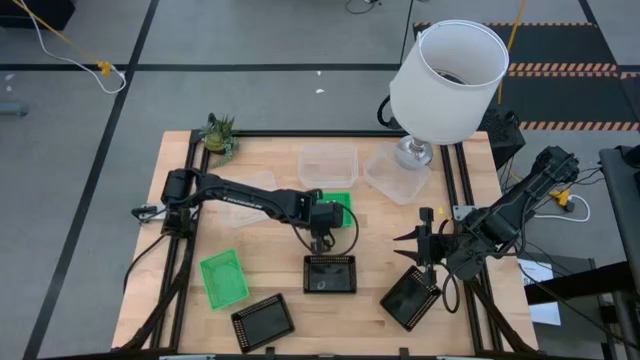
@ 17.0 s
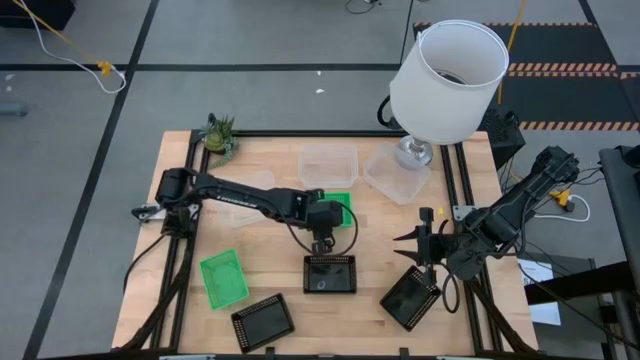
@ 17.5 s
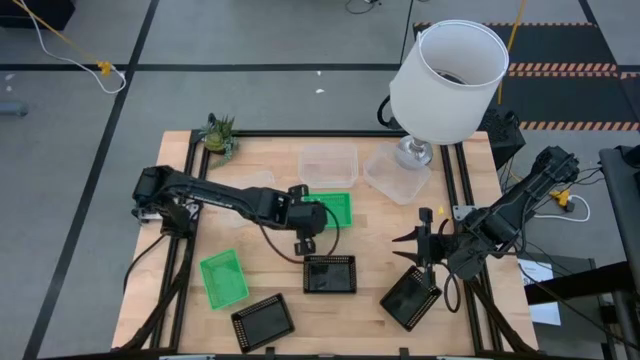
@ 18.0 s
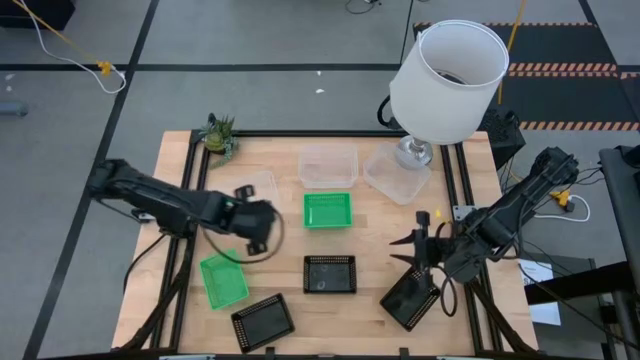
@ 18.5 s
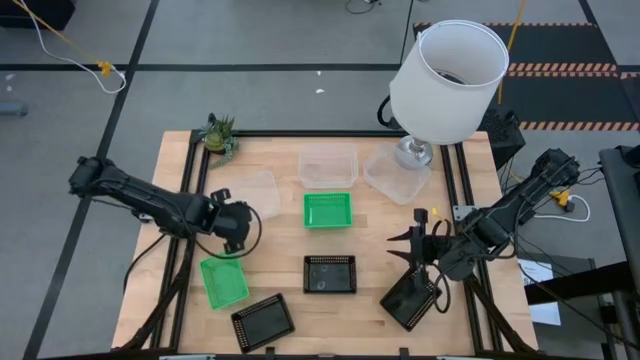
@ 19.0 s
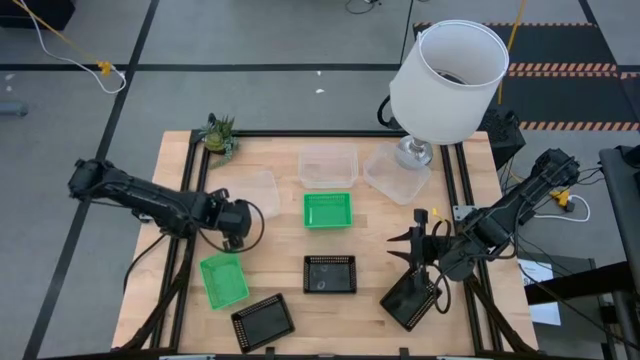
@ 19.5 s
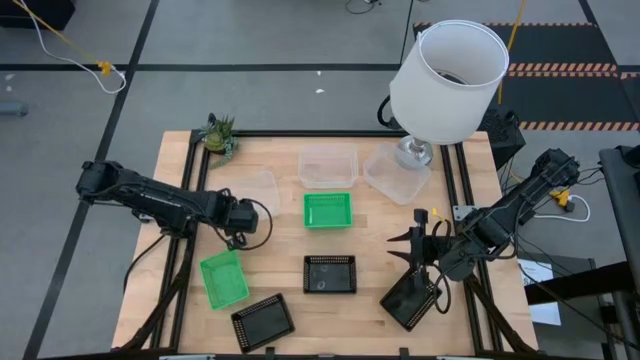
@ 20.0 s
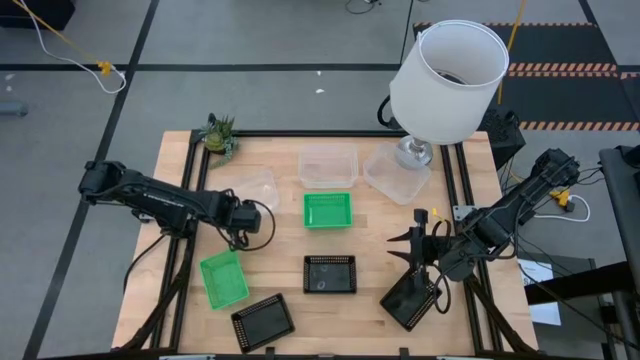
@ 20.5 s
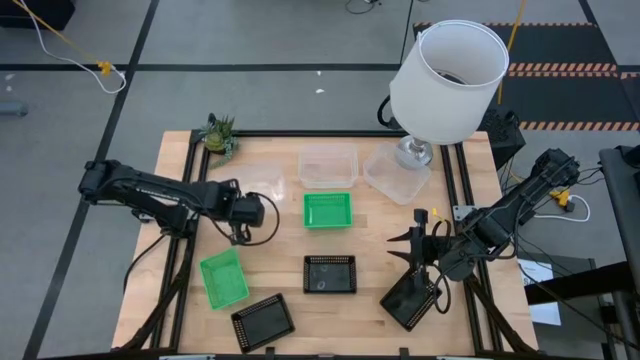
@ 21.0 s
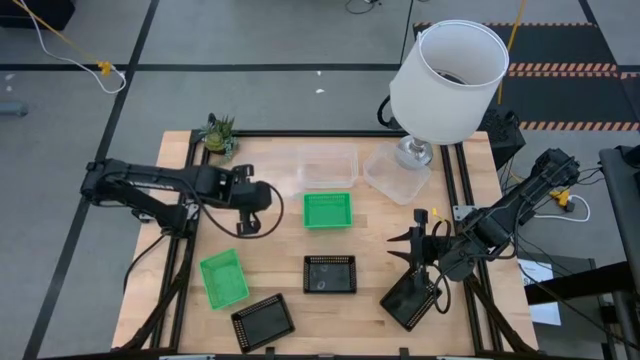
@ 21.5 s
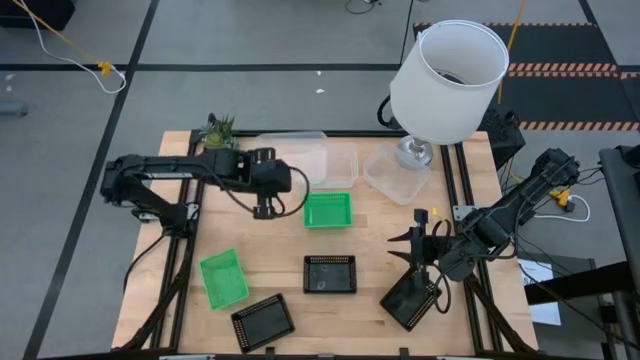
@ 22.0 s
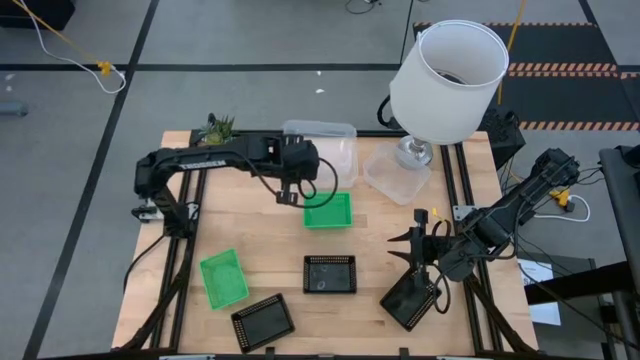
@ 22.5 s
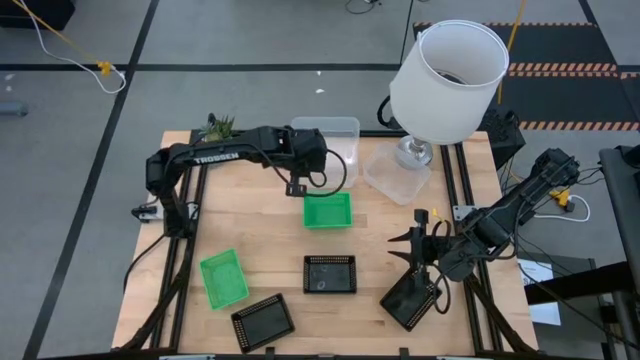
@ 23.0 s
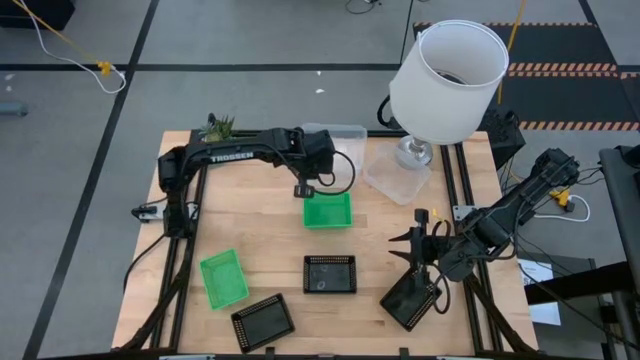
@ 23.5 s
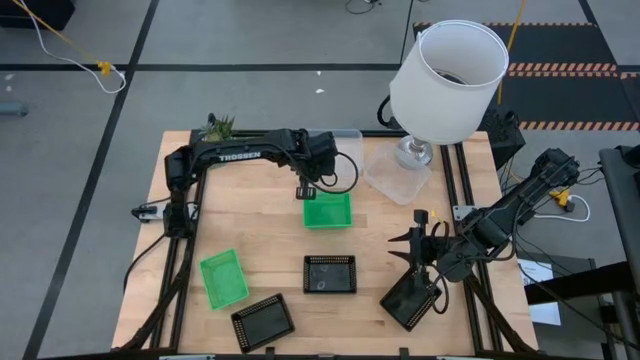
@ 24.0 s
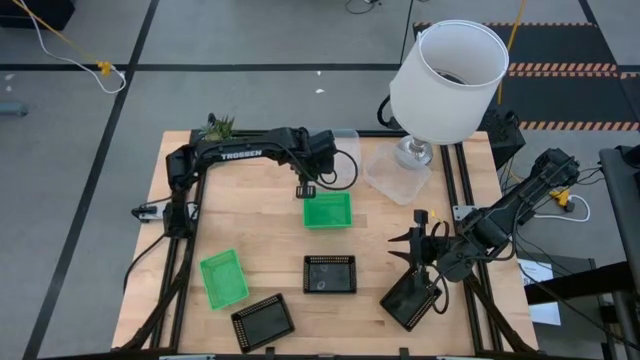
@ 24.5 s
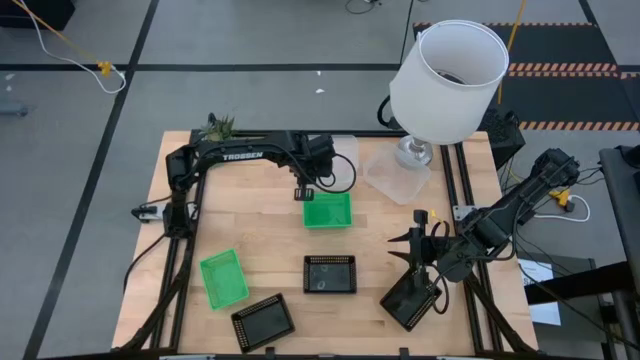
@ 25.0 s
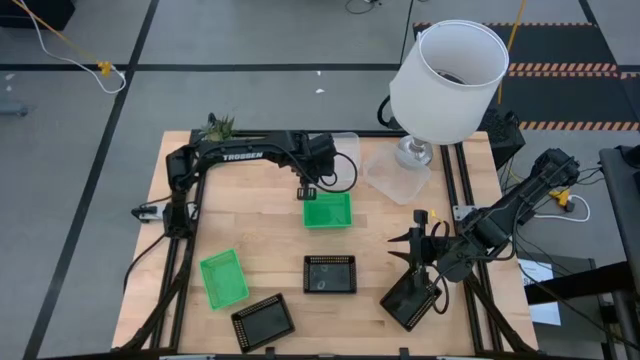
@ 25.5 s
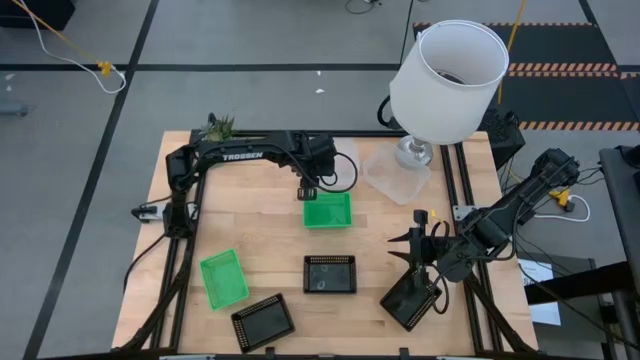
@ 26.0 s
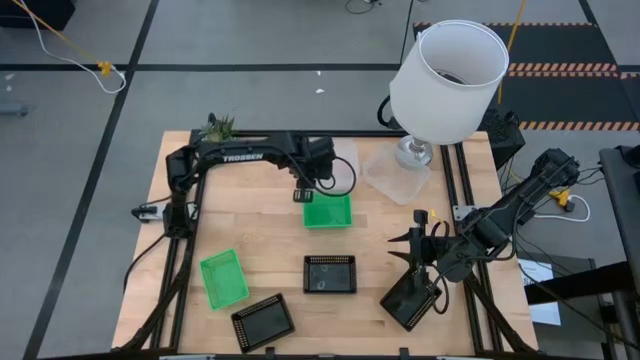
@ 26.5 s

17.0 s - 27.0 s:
Stack the left transparent bin on top of the middle transparent bin

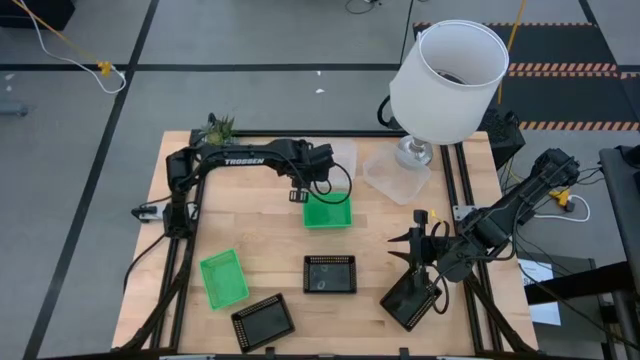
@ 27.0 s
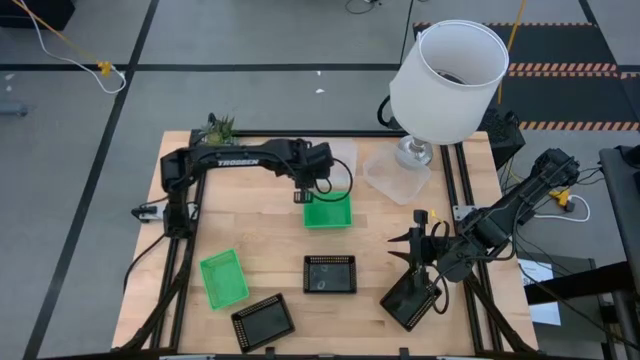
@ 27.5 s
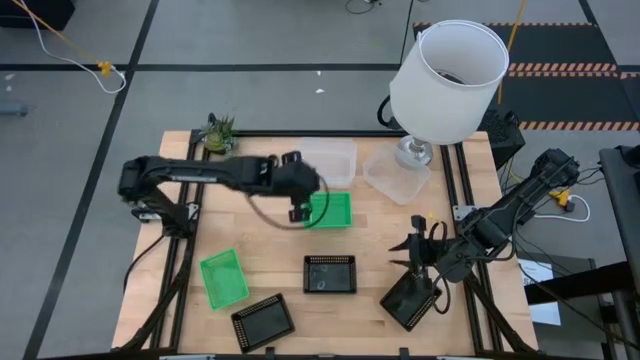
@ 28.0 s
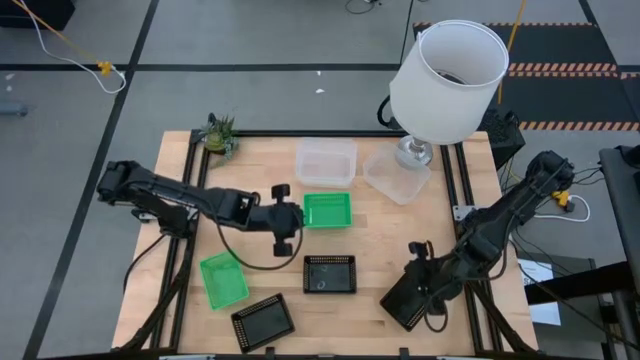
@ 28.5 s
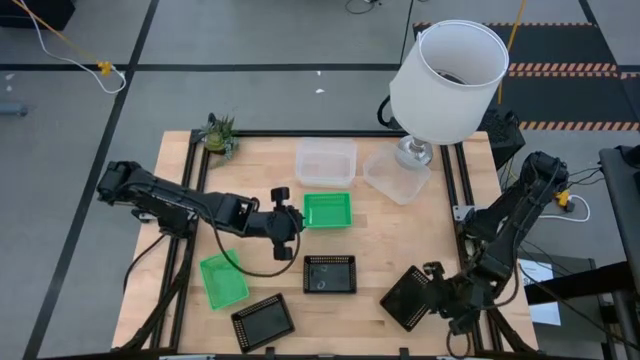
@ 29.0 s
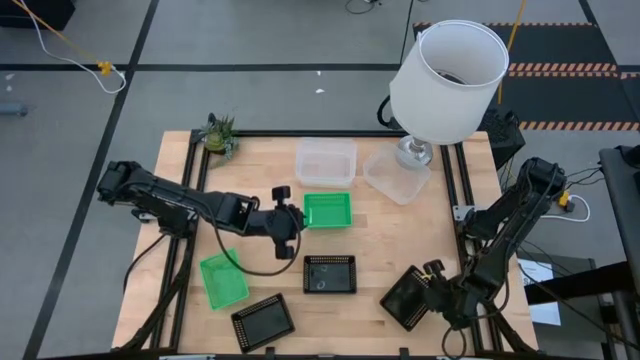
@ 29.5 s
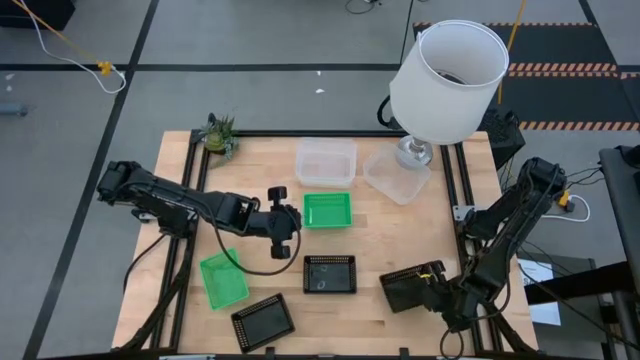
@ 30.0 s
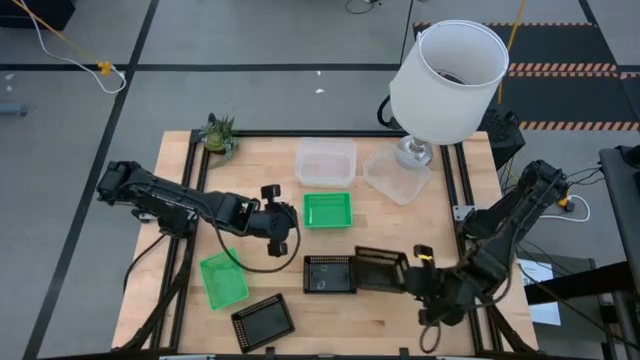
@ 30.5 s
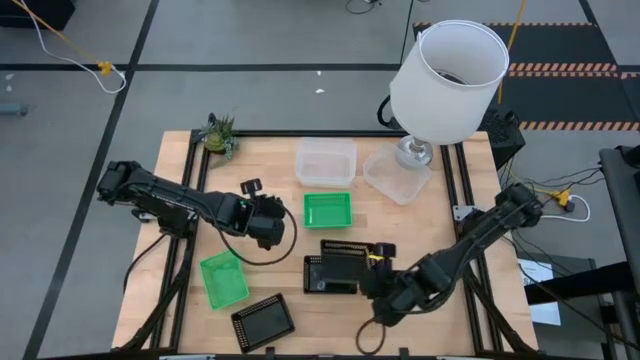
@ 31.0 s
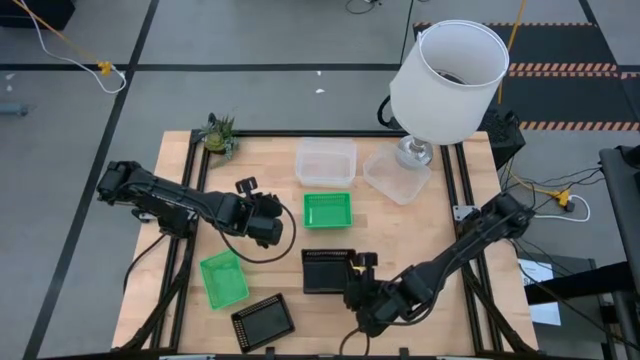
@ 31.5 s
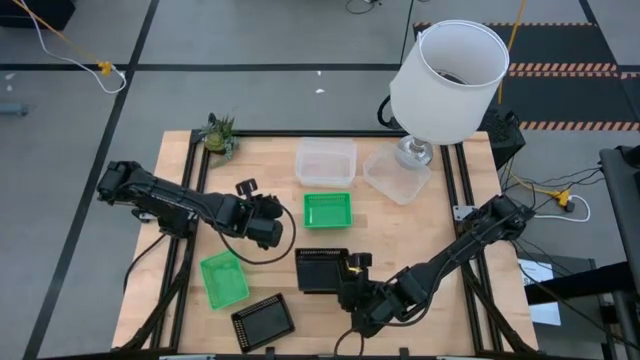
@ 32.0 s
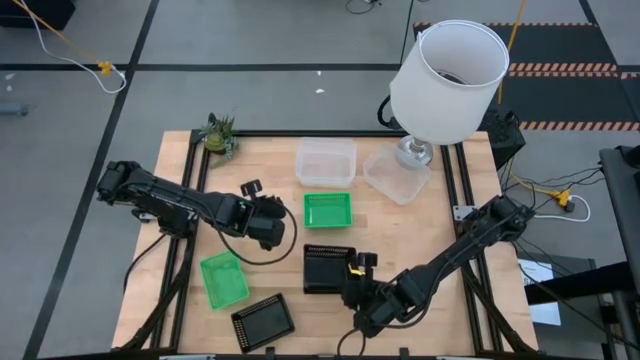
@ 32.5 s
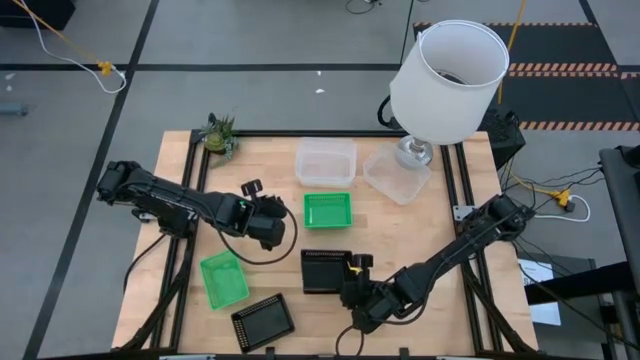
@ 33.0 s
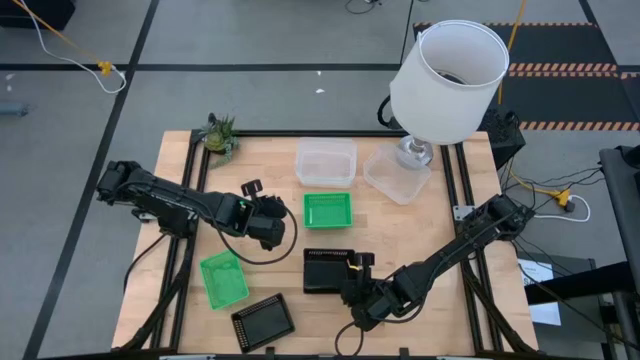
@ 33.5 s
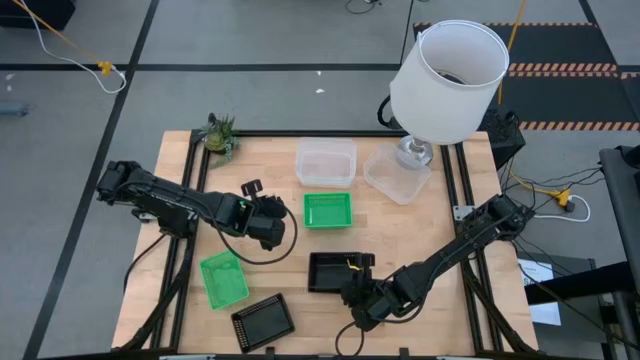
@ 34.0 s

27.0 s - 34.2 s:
Stack the right black bin on top of the middle black bin

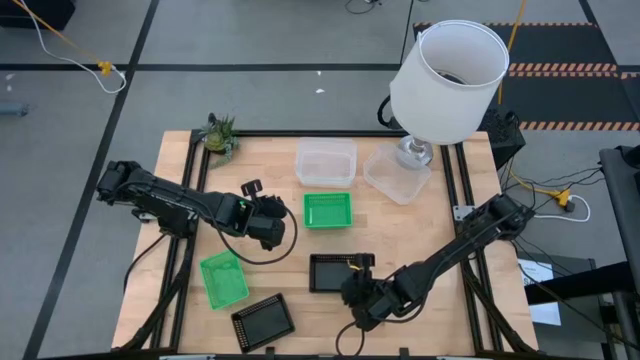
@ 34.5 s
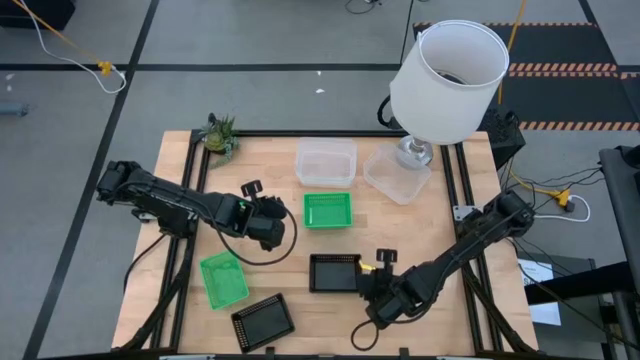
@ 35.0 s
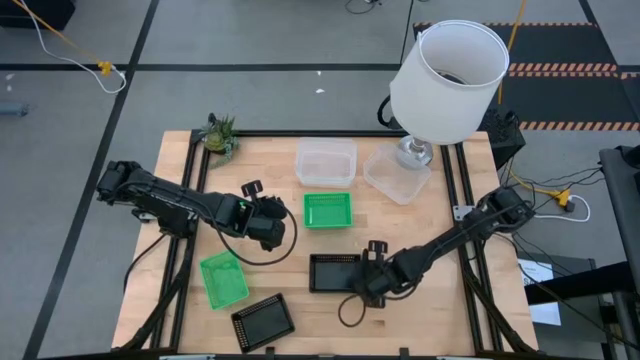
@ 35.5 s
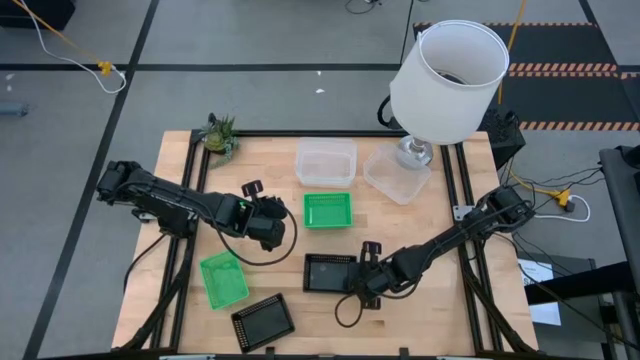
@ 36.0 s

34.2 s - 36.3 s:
Adjust the stacked black bins

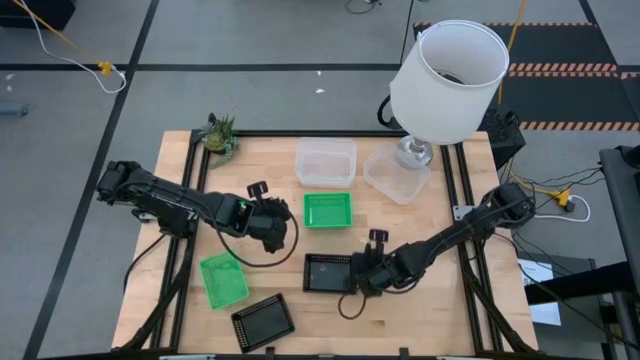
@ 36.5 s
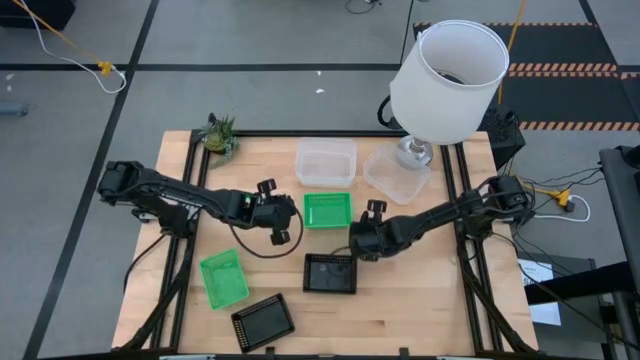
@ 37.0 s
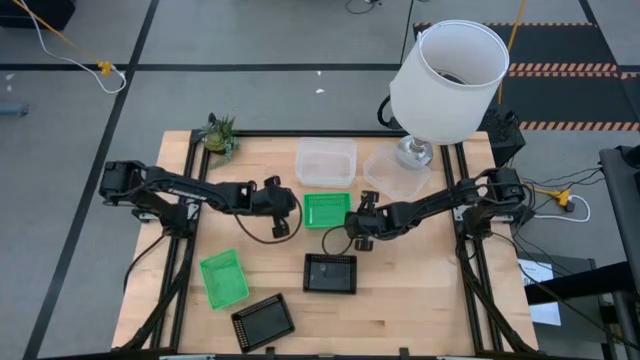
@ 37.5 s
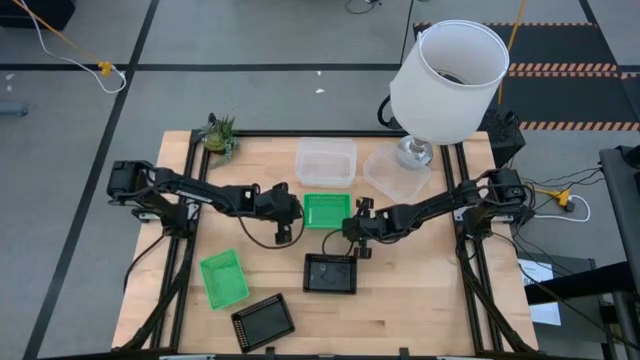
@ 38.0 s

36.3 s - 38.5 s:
Adjust the stacked green bins
